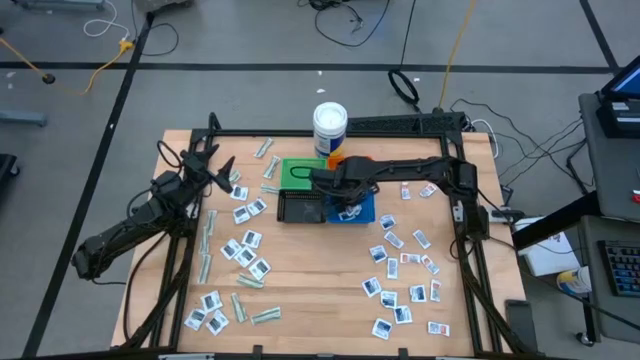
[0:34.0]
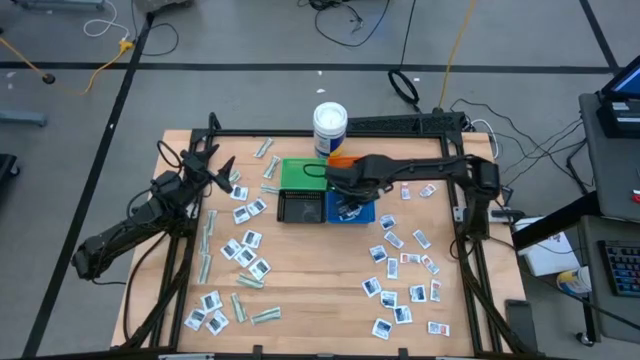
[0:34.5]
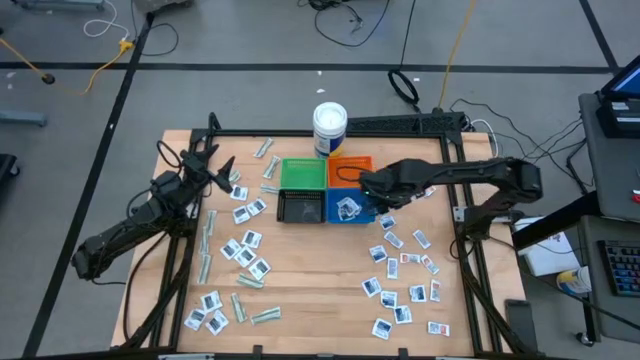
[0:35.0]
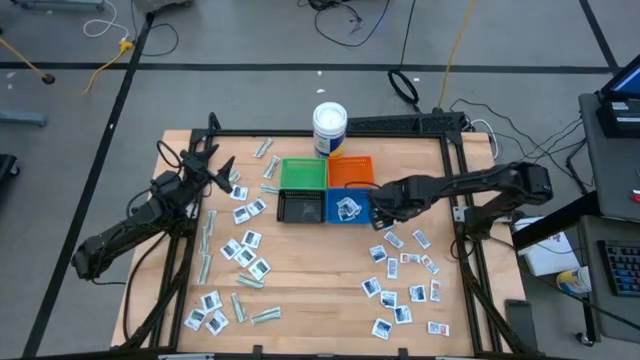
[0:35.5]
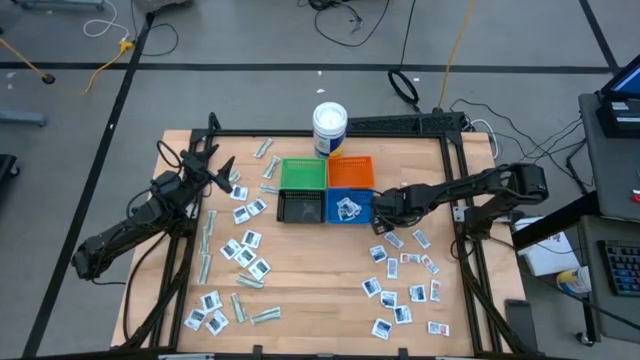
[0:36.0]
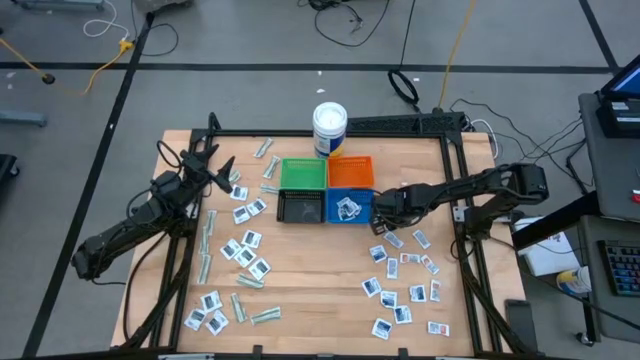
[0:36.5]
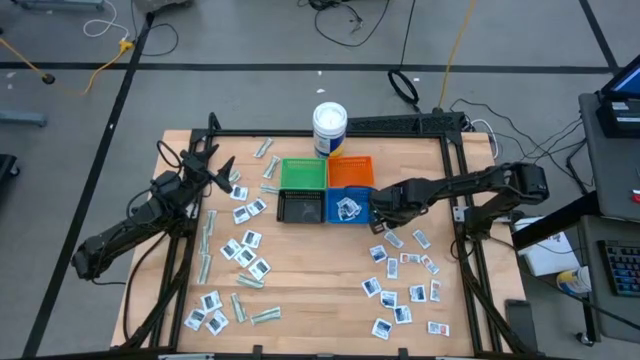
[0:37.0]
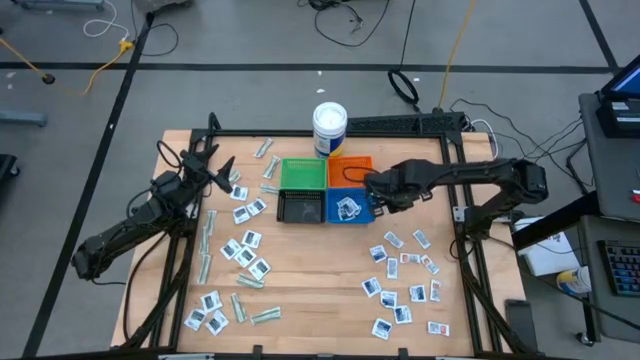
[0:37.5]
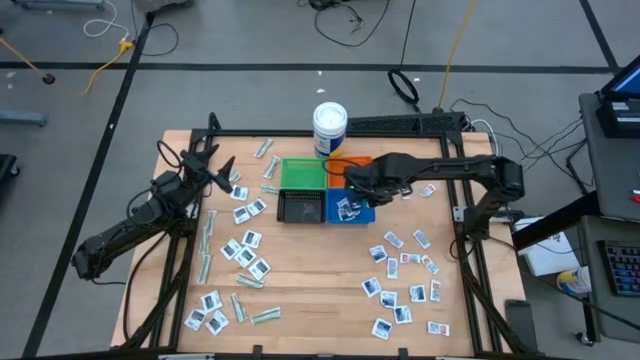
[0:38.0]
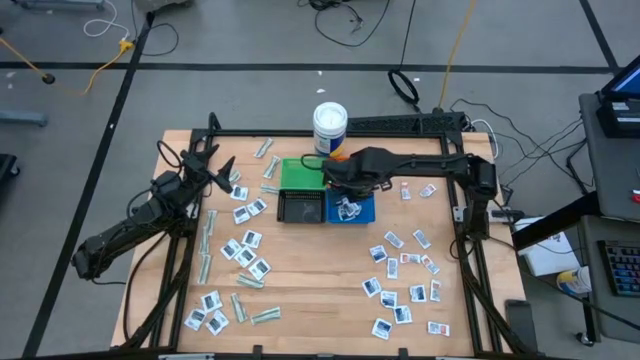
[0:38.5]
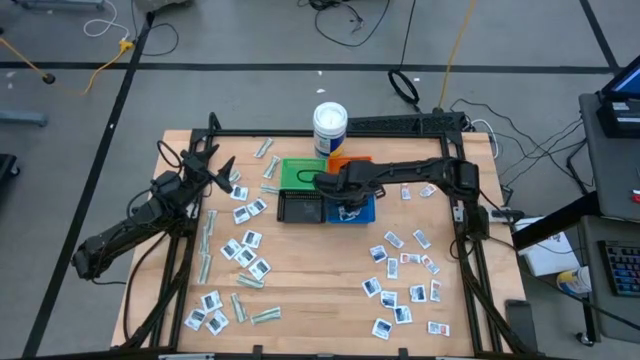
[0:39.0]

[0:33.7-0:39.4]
Task: Pick & Place First Aid Supplies
Put the blue alcohol pad into the blue basket

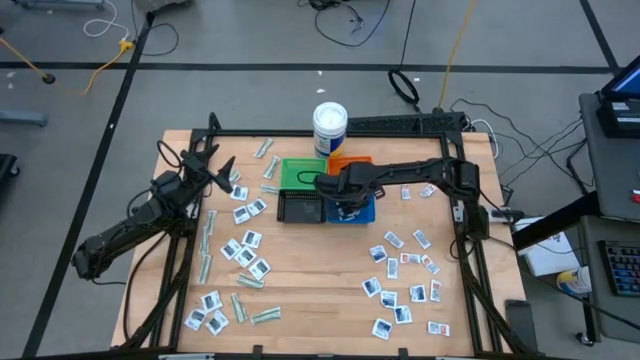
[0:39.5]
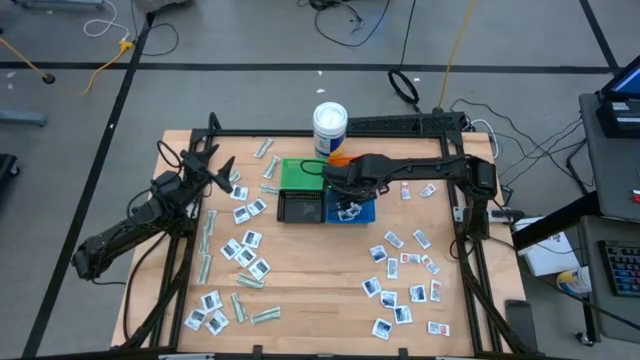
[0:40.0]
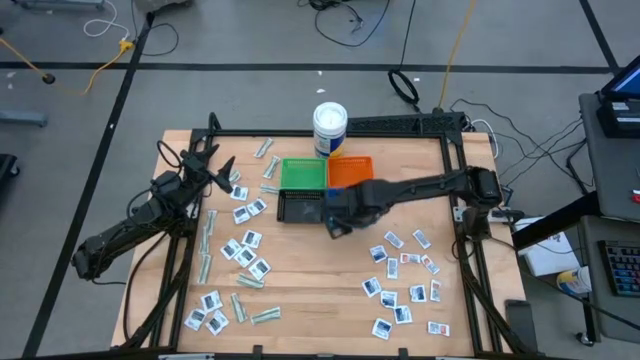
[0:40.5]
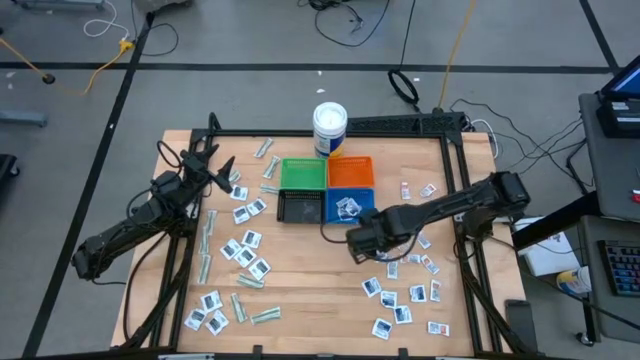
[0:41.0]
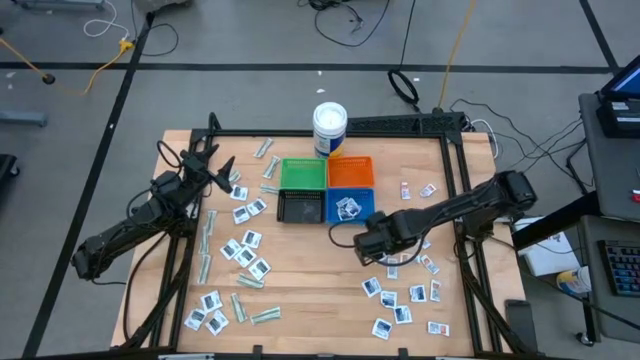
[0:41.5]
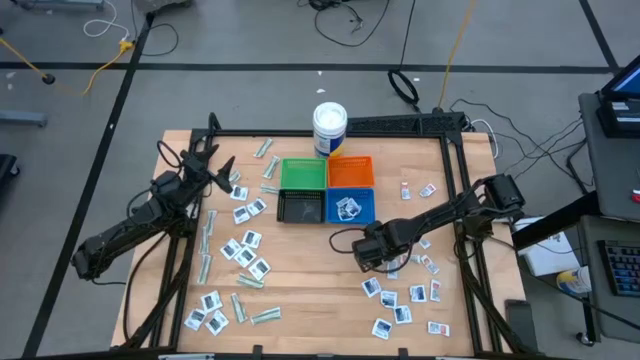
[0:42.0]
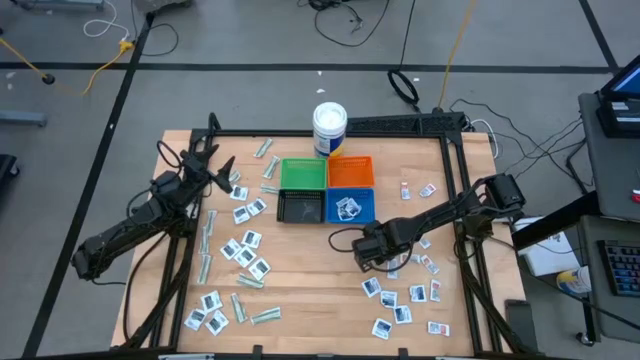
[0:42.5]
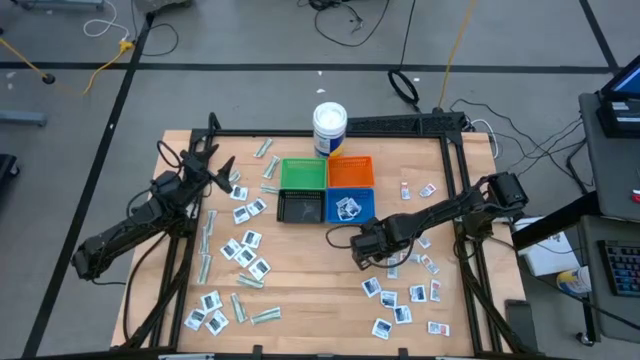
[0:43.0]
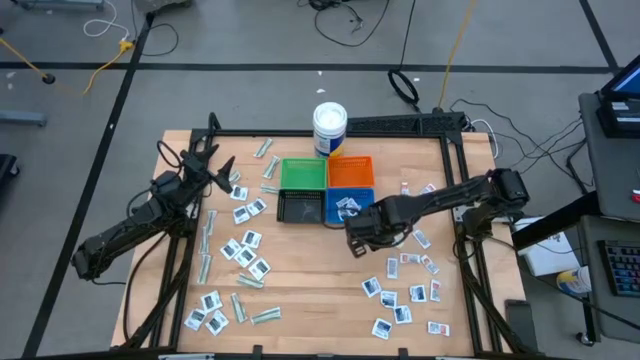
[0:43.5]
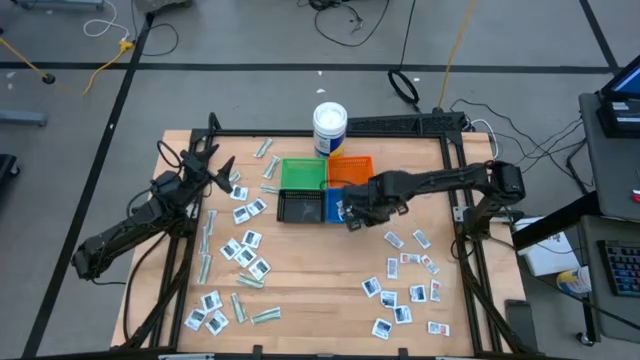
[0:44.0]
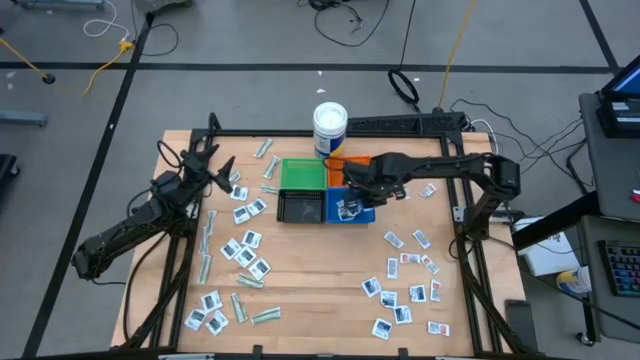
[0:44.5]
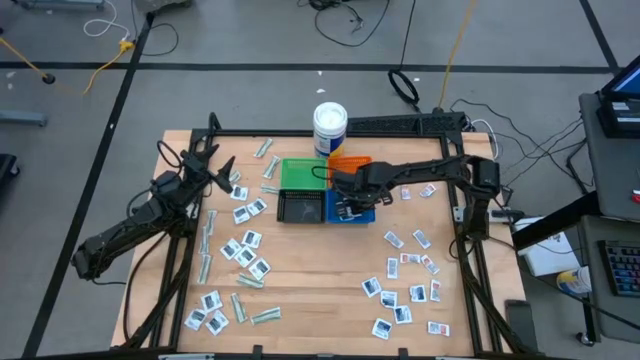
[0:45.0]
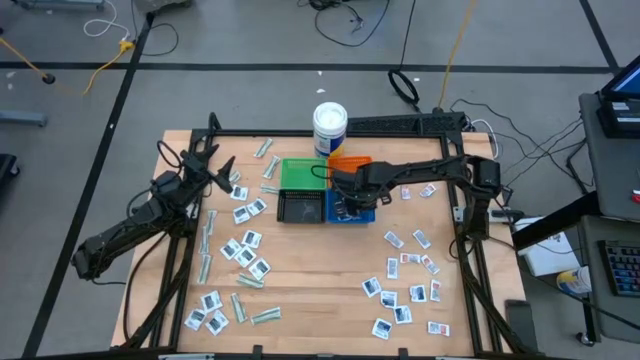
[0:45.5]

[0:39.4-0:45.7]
Put the blue alcohol pad into the blue basket

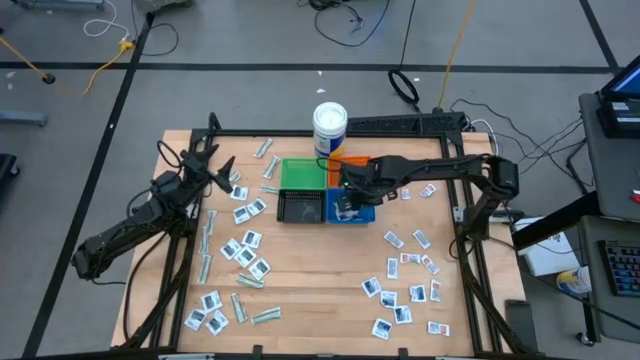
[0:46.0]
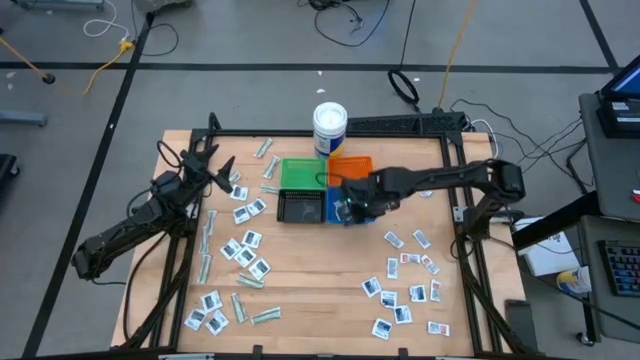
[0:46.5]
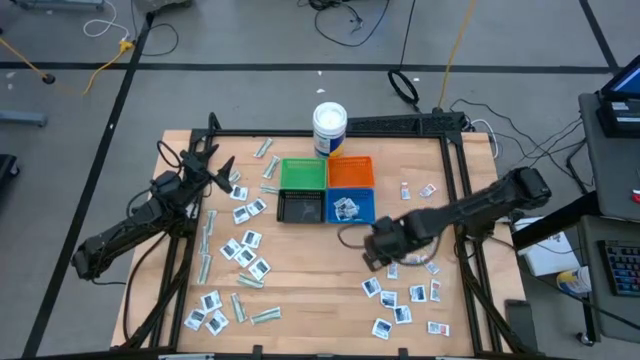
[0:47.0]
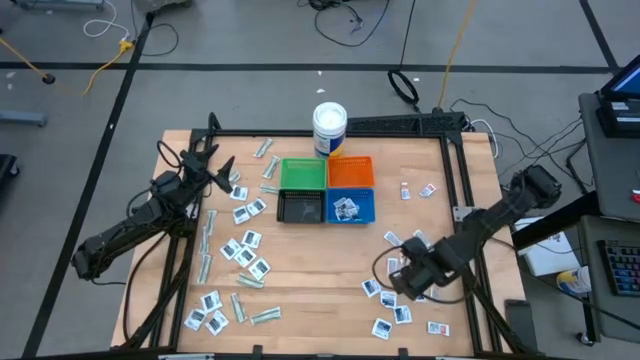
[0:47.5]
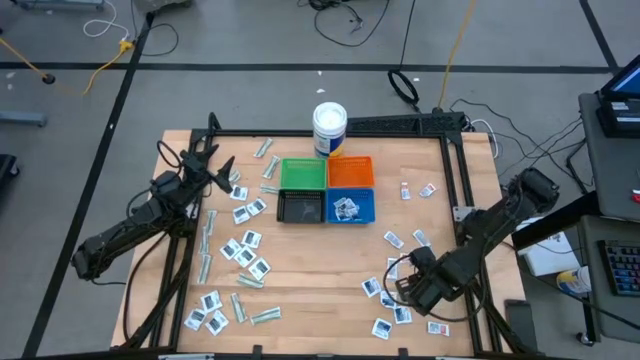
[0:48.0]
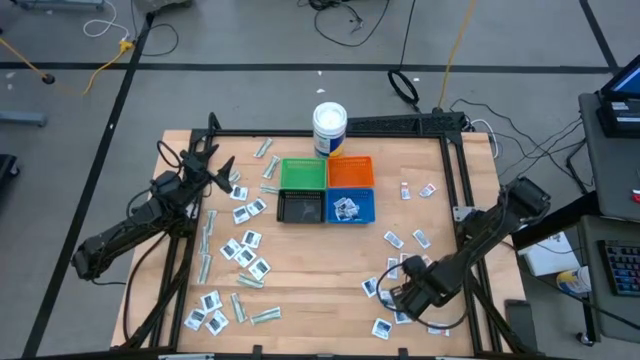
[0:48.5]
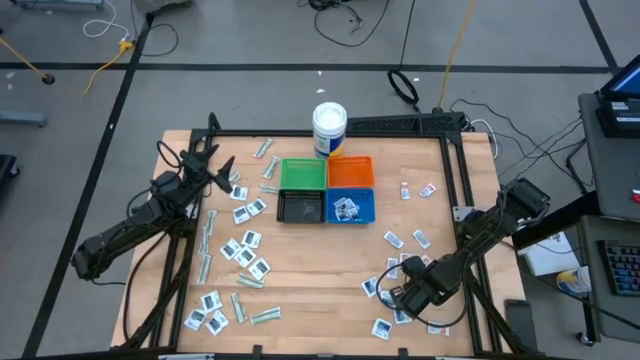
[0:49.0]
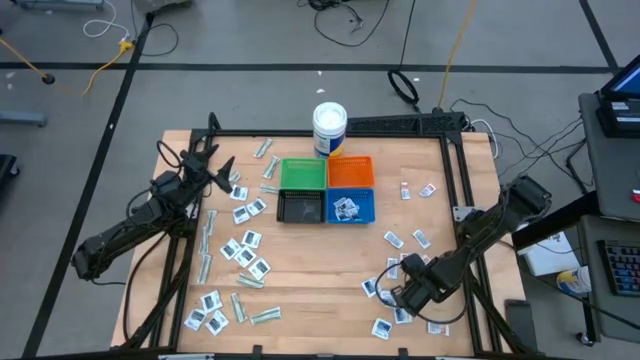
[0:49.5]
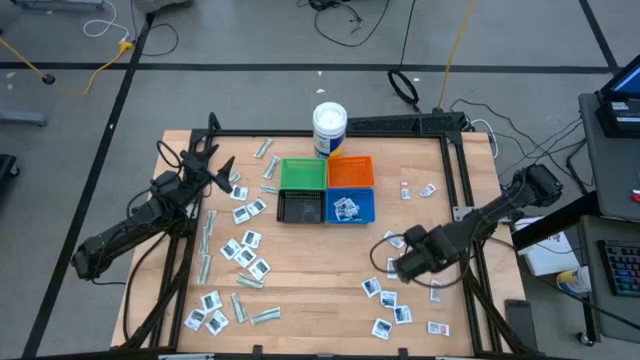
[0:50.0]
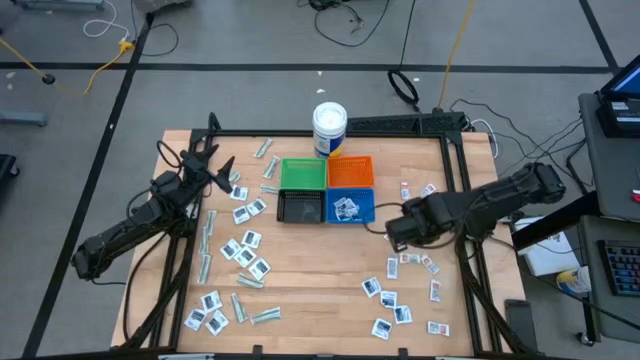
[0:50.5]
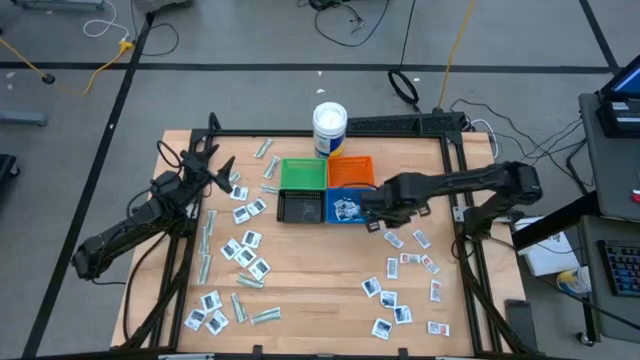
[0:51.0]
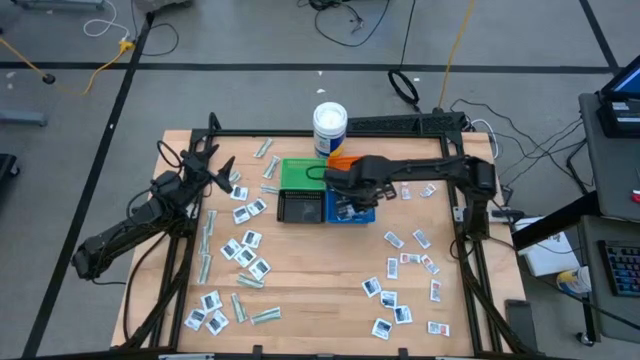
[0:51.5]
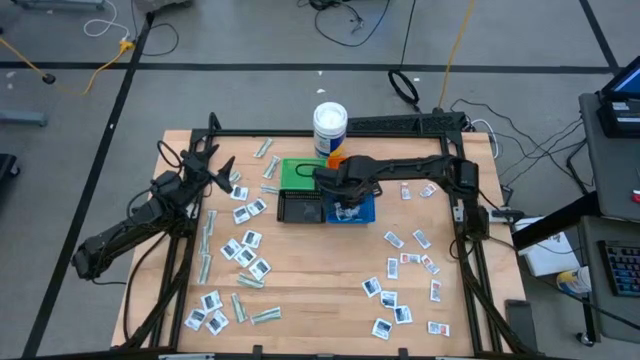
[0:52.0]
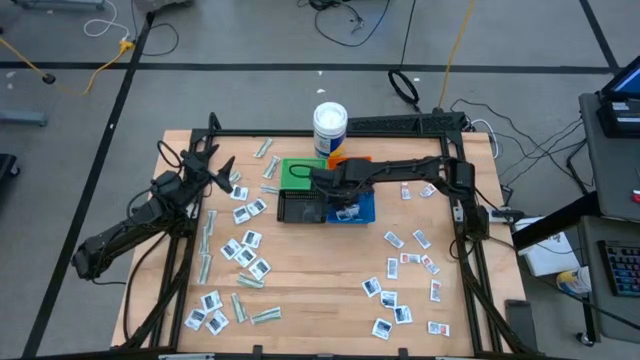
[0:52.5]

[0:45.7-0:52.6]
Put the blue alcohol pad into the blue basket

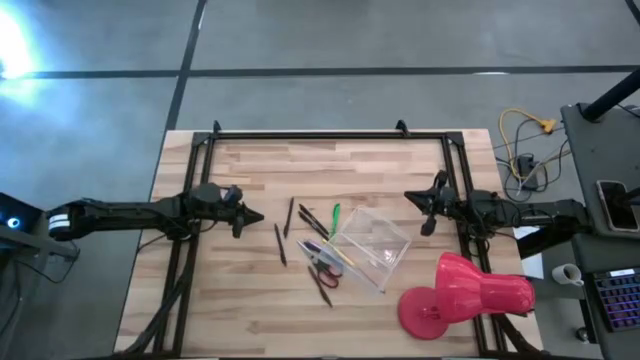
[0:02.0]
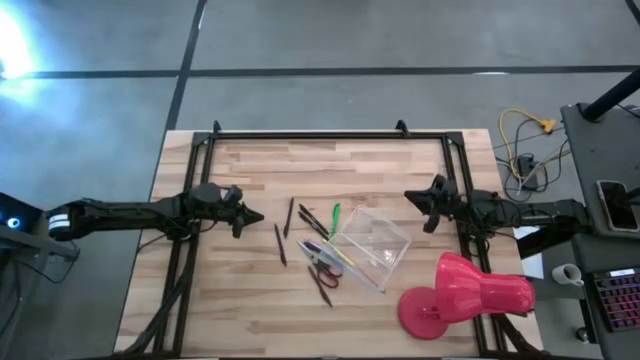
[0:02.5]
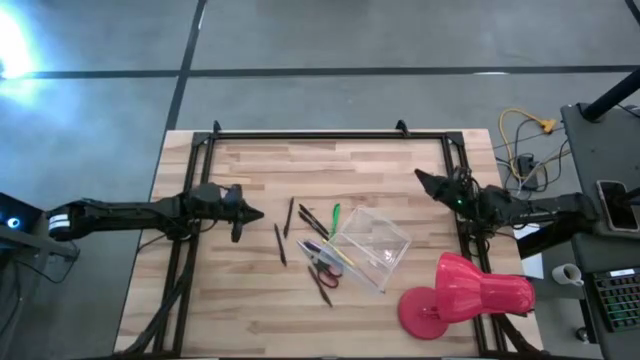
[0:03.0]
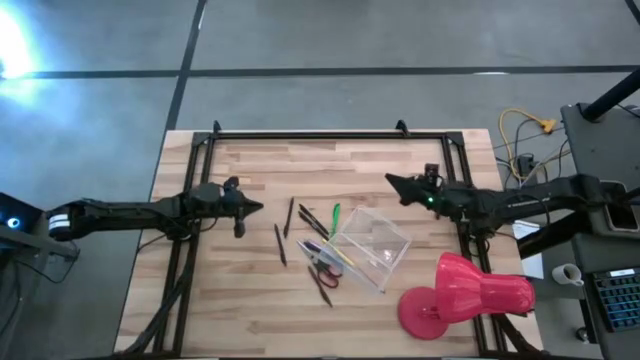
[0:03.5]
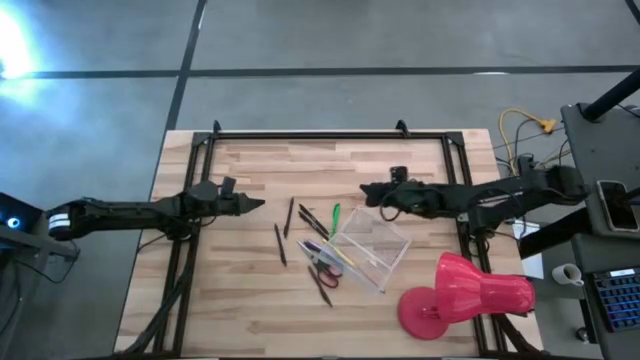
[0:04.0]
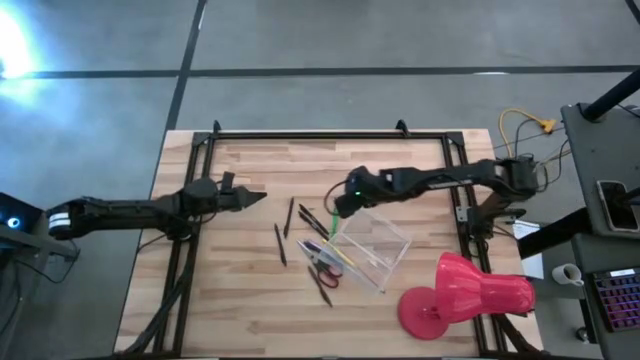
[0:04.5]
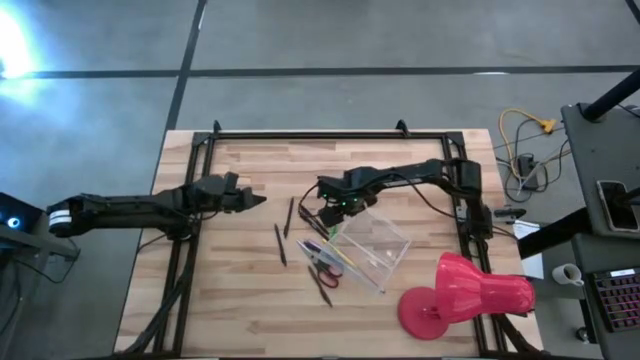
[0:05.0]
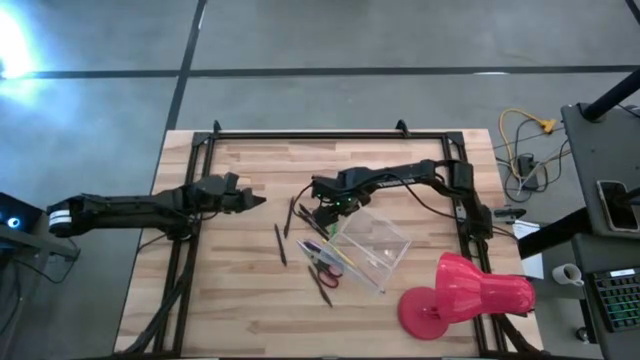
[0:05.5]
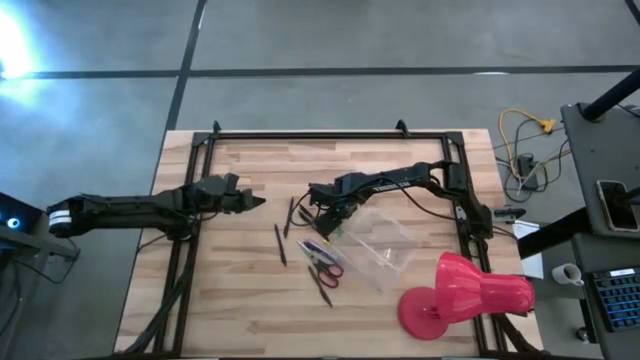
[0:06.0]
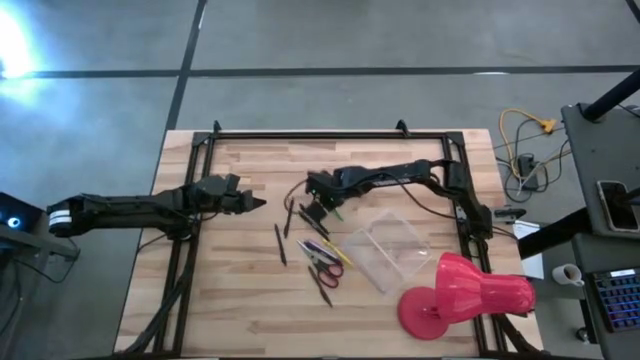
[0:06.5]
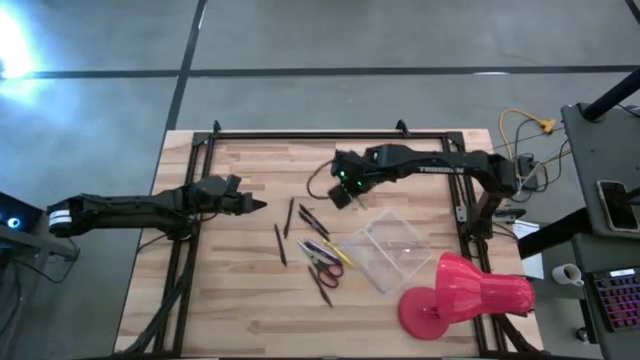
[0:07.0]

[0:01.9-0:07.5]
Task: Pick & place school supplies into a supply box
Put the green pen into the transparent supply box
